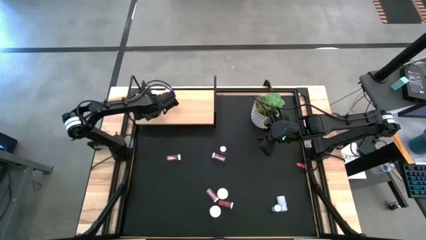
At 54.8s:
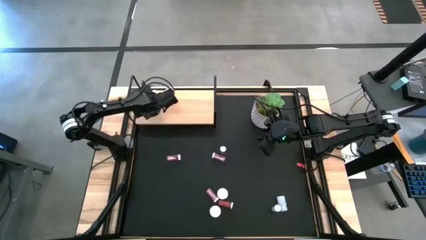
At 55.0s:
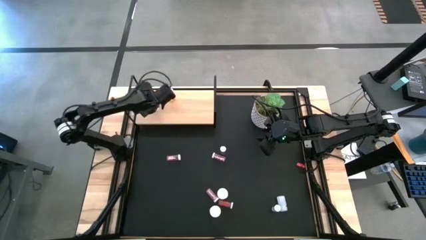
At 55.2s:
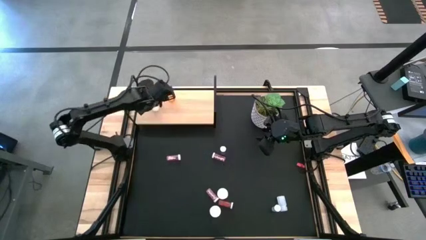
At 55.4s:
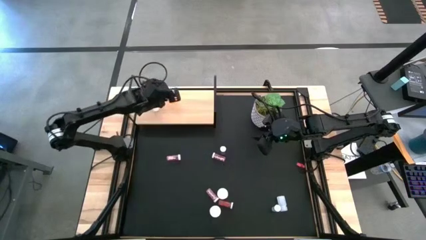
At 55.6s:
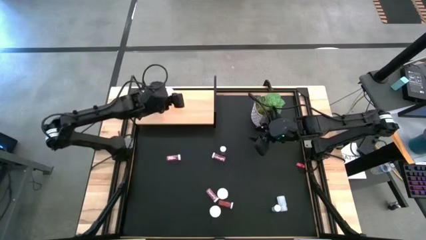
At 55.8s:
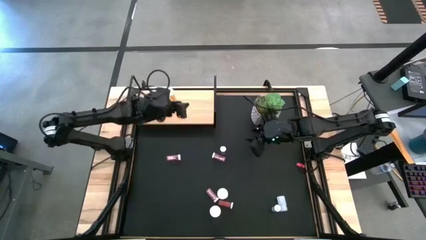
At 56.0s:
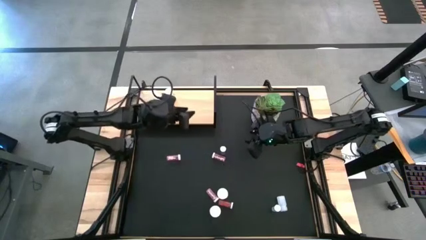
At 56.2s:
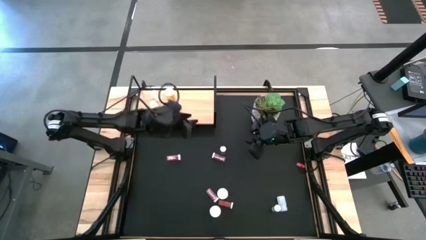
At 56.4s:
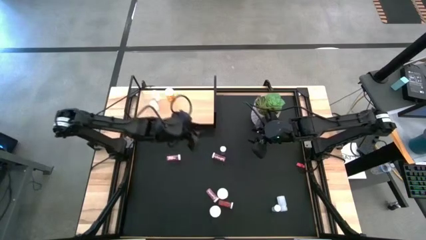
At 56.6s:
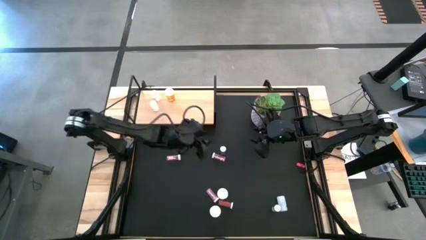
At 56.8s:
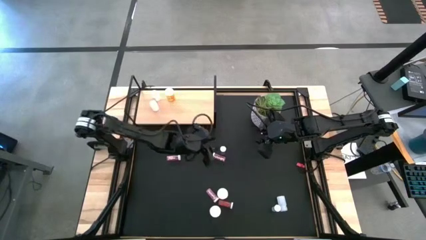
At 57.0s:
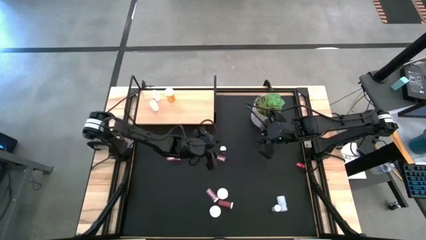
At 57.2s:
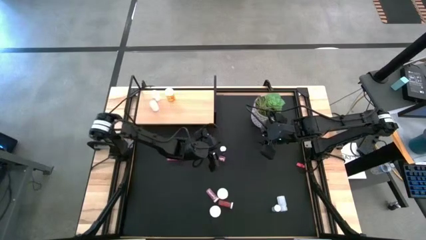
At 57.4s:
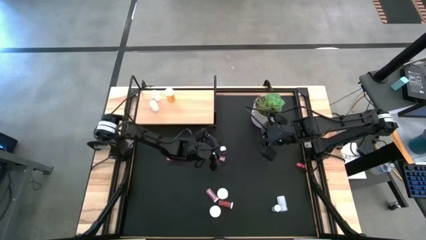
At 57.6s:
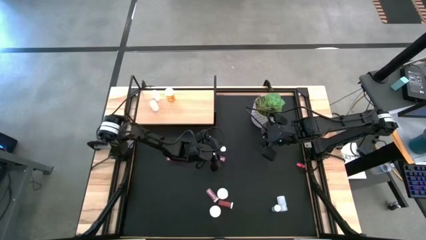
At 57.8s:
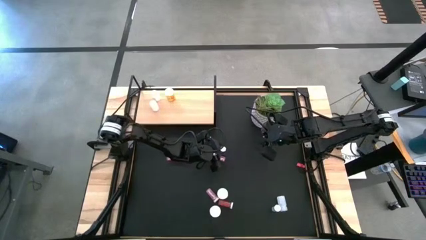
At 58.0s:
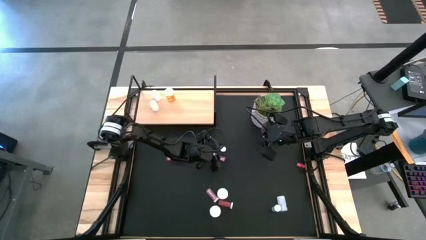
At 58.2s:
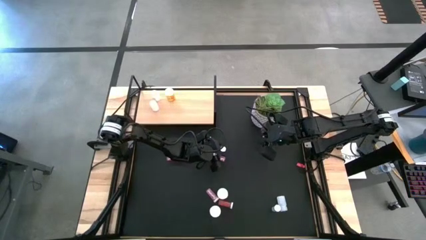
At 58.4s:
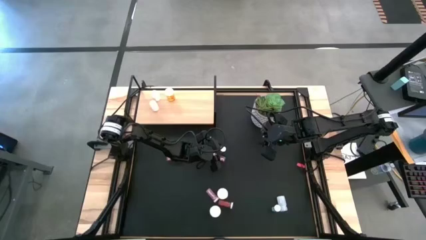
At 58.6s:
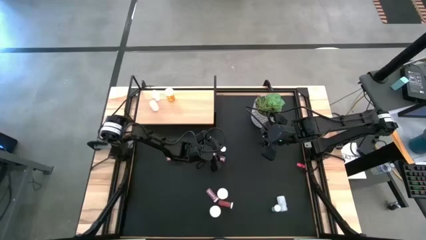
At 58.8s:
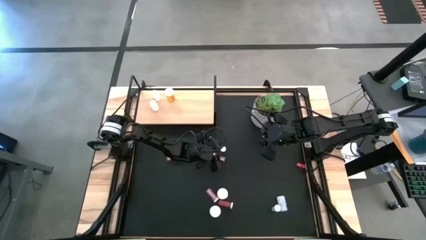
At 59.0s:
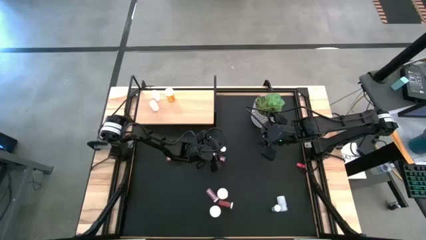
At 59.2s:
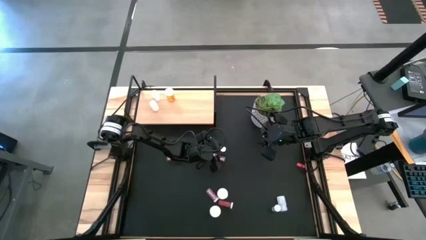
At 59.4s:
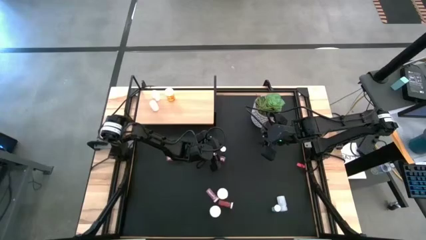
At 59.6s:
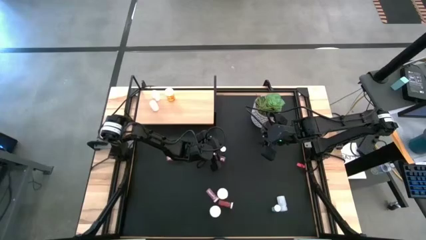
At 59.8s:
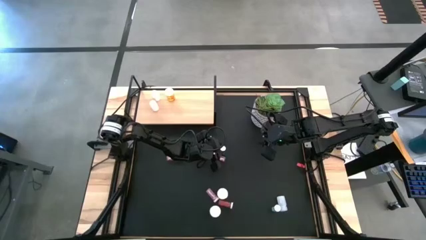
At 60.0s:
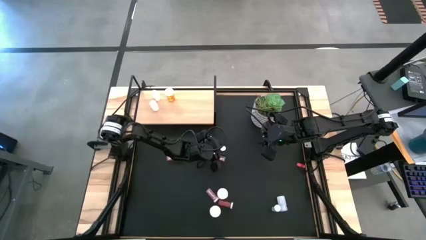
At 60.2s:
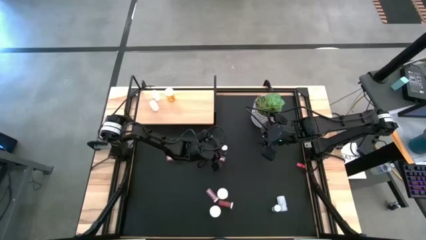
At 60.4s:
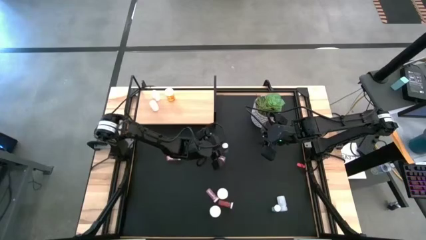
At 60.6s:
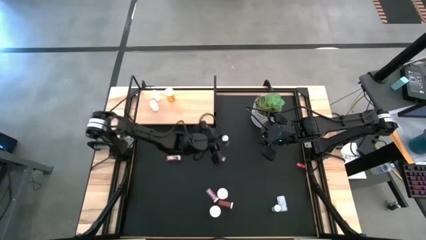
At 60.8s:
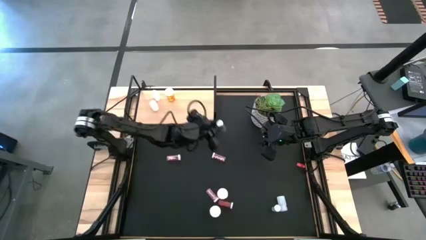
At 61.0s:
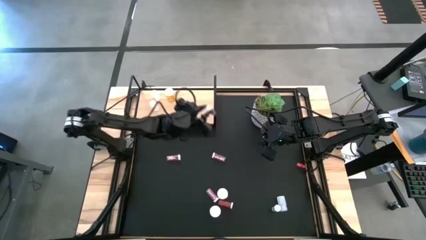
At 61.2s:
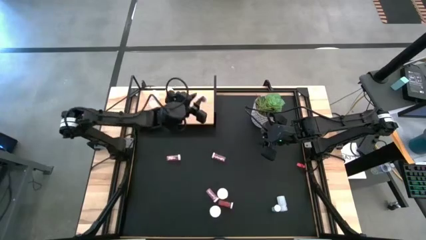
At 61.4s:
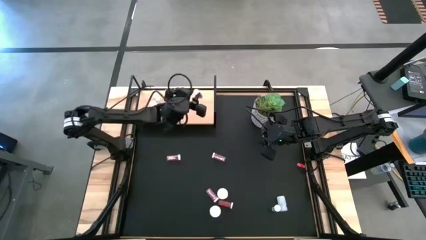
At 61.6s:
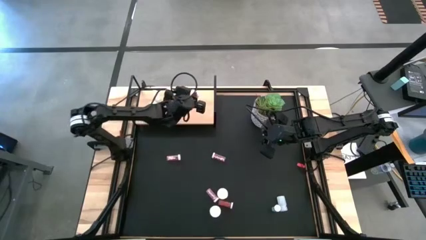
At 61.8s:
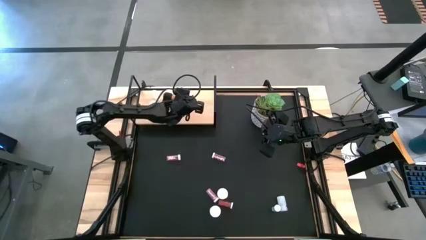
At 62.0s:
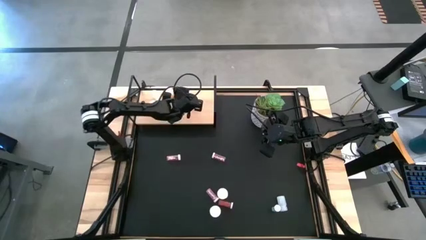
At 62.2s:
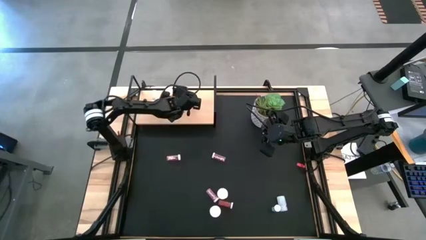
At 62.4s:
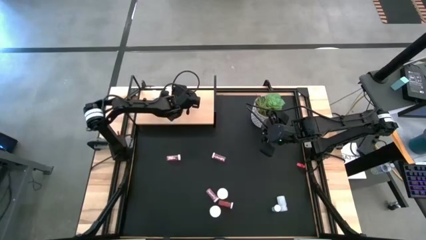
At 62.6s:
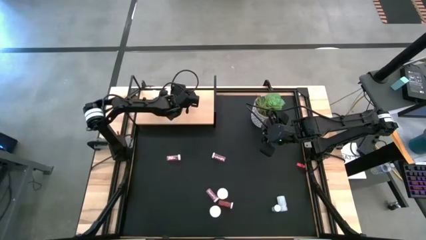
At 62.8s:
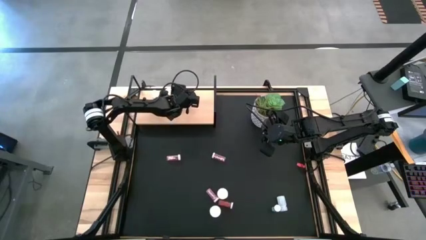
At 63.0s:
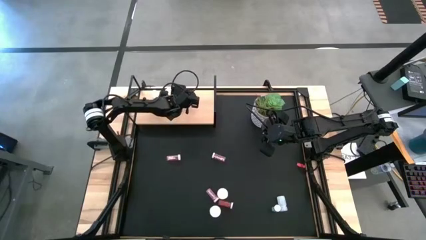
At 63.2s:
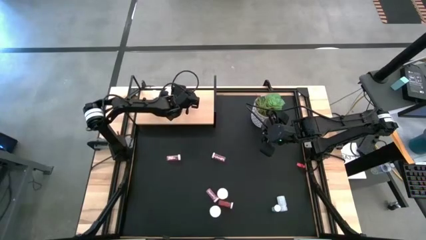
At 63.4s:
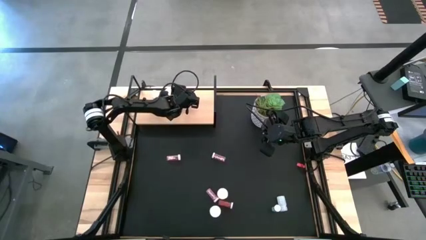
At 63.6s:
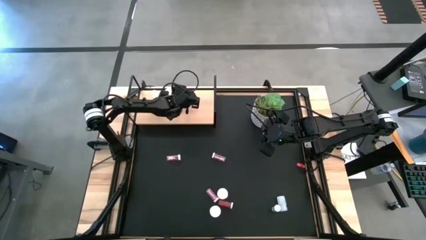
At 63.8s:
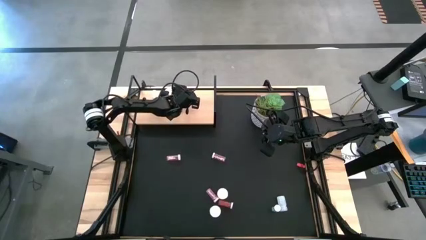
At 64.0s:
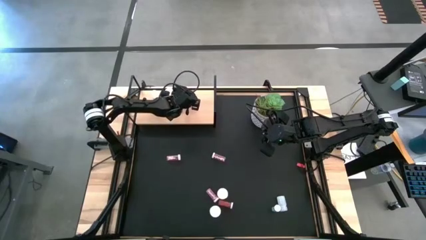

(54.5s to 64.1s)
Task: Pick and place medicine bottles onto shelf by color
Put the top blue pill bottle on the shelf

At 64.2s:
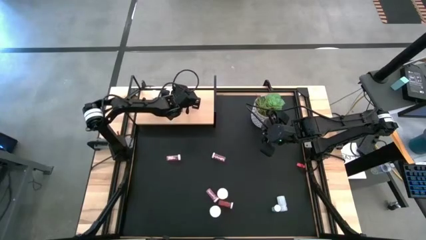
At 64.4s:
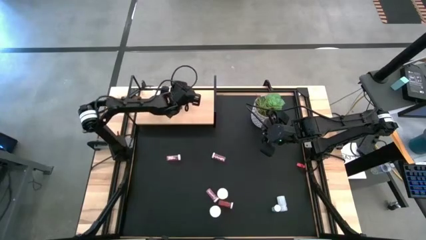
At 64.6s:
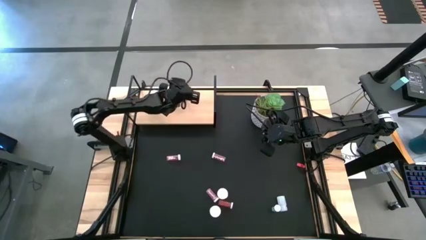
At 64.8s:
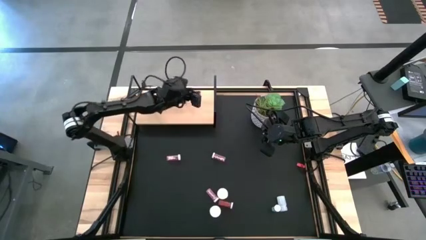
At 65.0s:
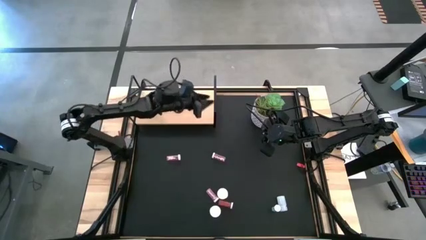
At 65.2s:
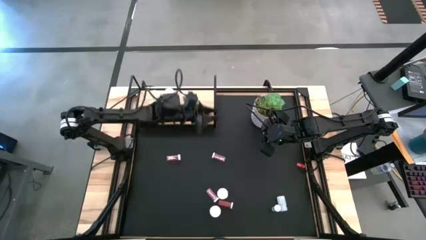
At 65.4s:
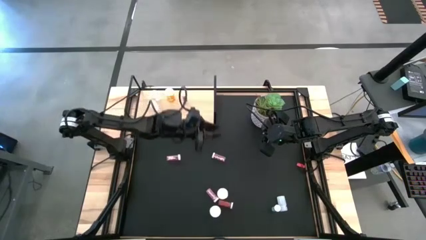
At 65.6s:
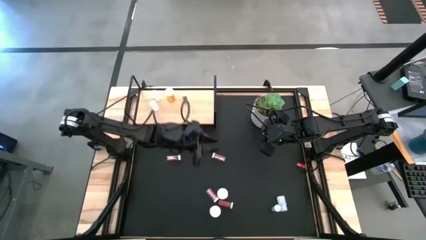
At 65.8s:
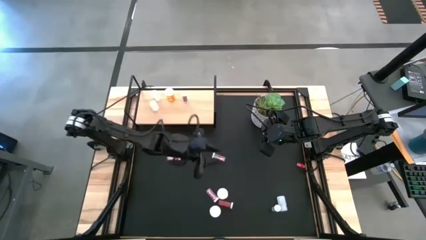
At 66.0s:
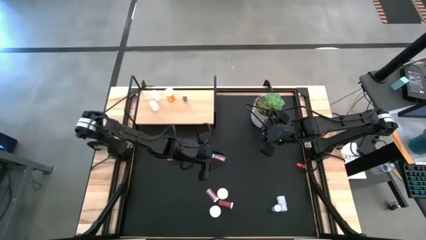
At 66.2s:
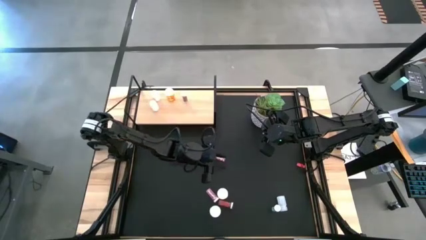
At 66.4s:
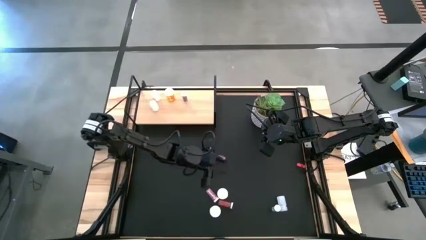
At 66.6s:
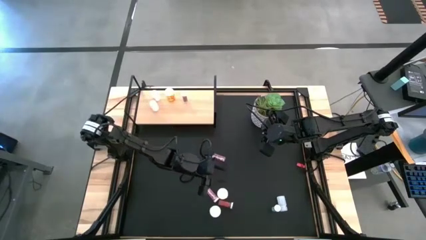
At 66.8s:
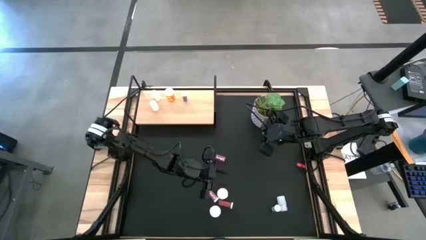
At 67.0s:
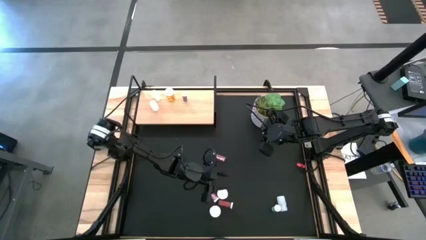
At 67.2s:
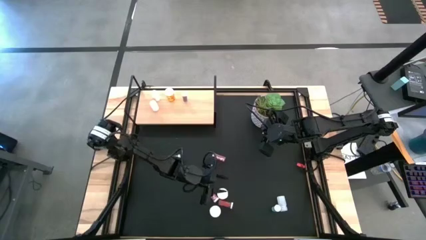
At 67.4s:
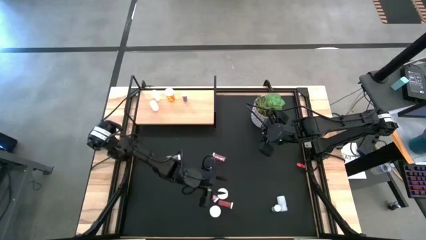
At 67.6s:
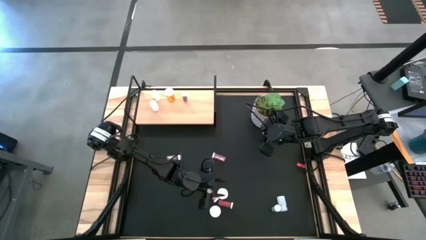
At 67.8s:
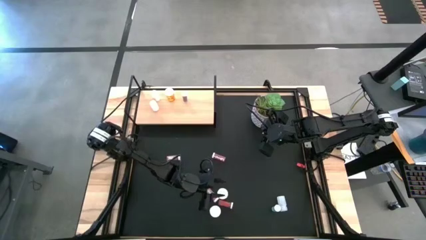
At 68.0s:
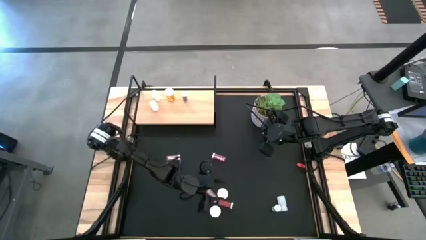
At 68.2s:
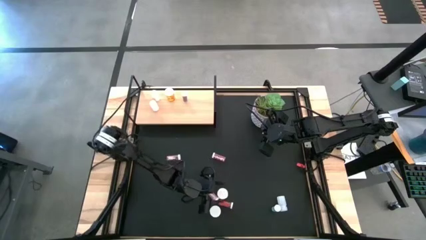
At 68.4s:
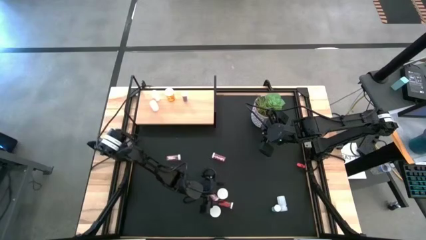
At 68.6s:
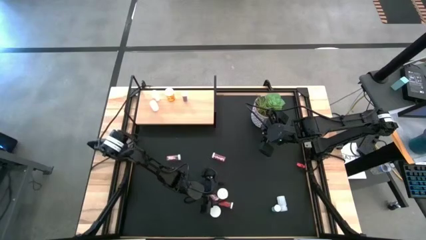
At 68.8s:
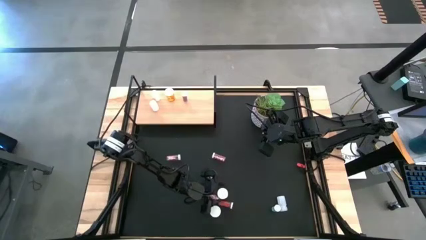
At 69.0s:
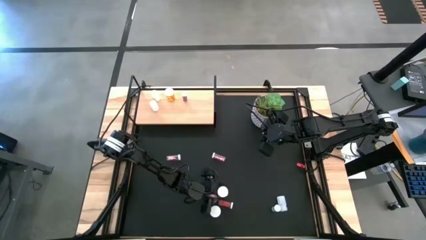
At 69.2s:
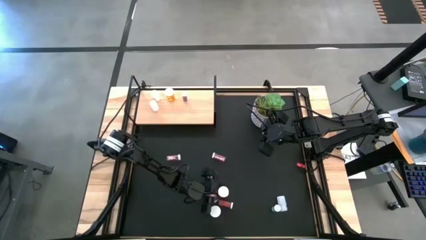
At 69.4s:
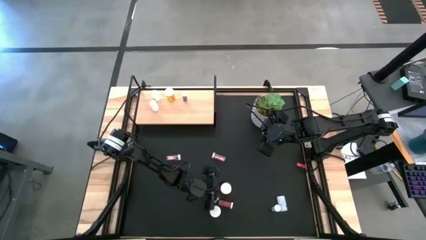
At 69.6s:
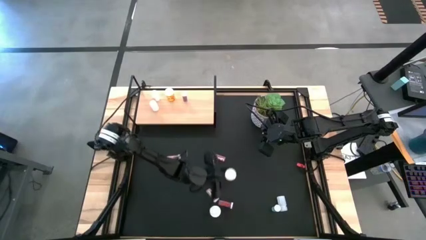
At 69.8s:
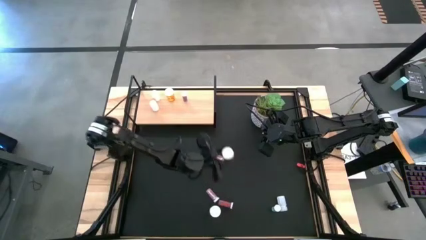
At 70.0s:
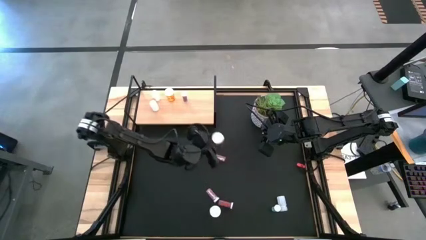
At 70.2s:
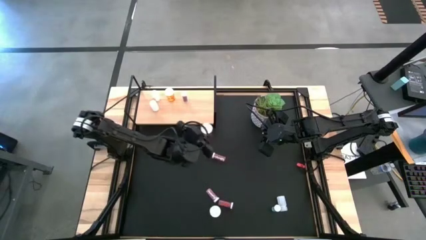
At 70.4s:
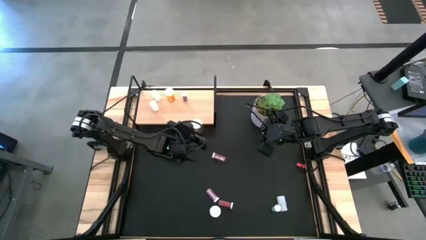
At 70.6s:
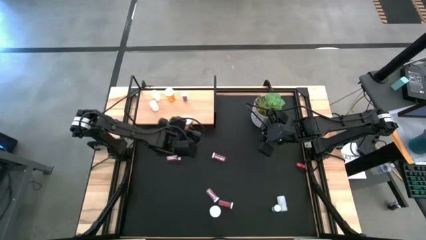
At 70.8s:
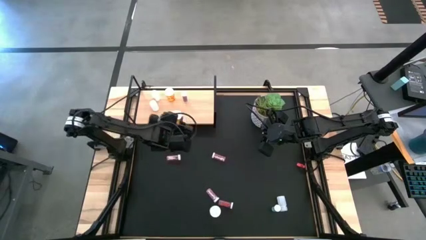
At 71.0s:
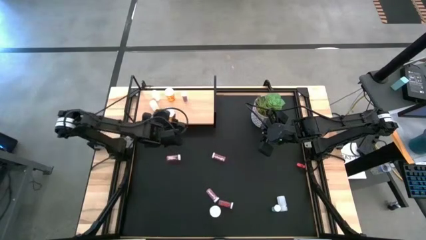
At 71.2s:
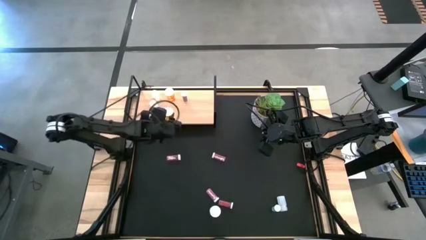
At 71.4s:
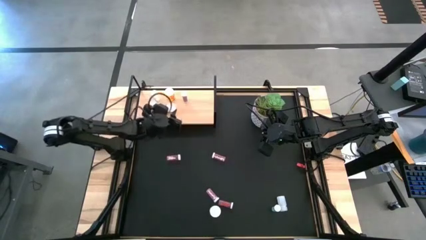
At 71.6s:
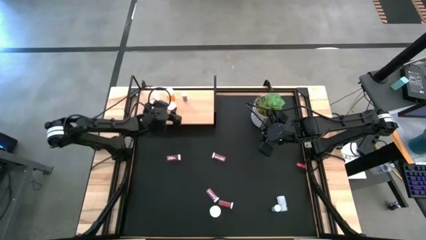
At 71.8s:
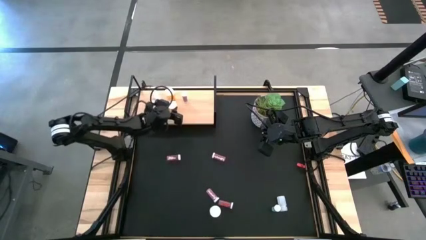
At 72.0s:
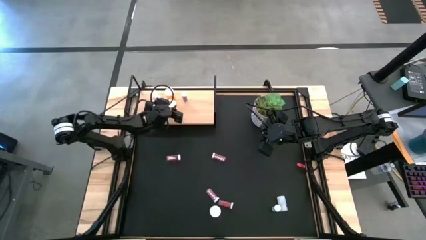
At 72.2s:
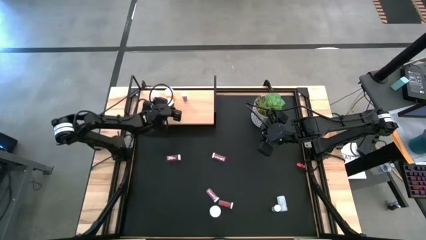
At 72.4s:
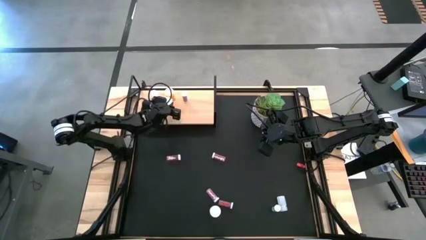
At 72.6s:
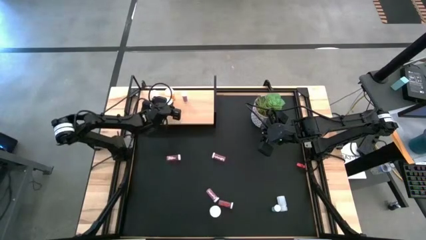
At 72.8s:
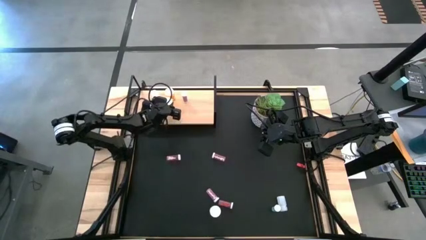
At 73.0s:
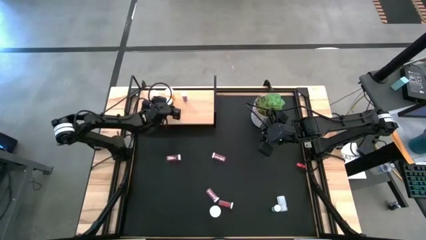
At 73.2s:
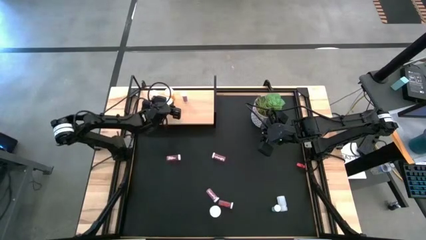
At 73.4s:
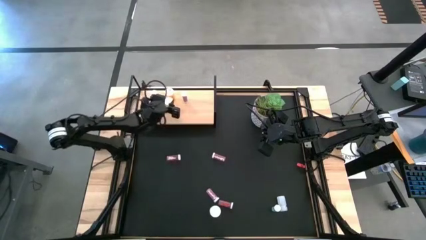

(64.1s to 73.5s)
Put the top orange pill bottle on the shelf aligned with the other orange pill bottle
